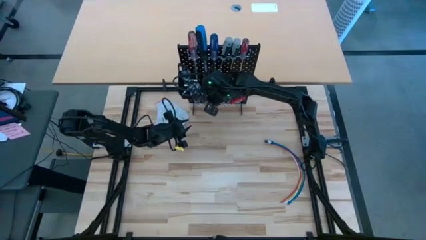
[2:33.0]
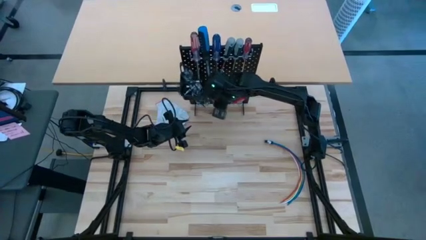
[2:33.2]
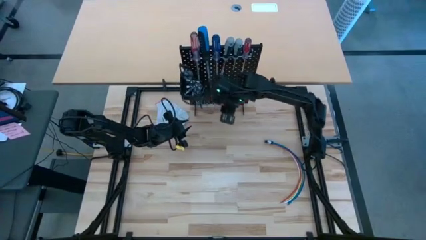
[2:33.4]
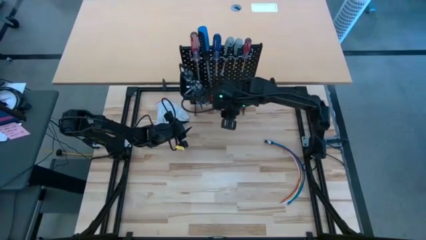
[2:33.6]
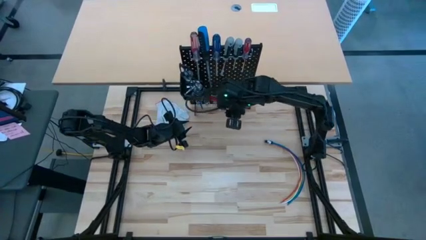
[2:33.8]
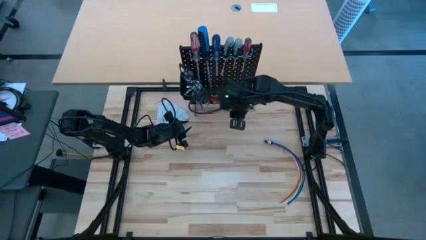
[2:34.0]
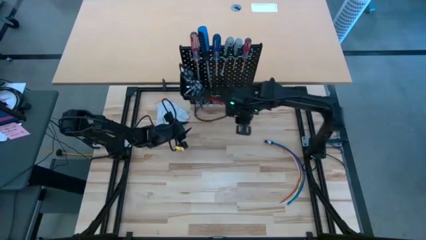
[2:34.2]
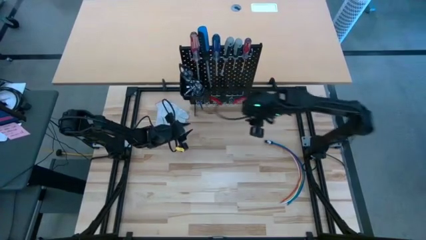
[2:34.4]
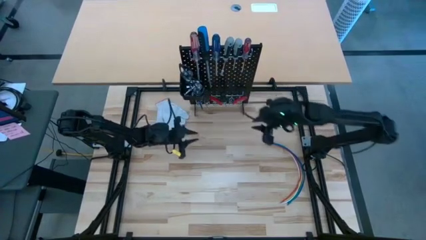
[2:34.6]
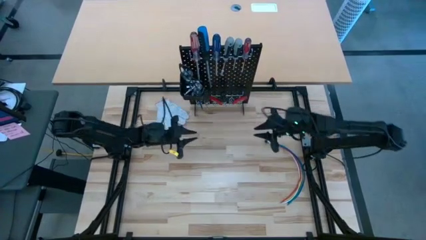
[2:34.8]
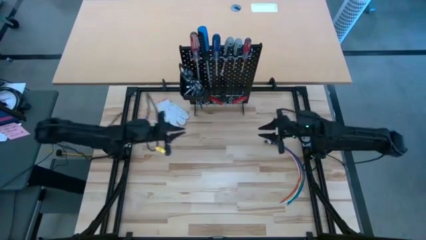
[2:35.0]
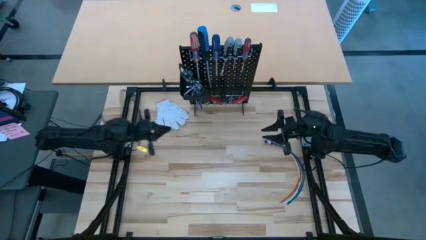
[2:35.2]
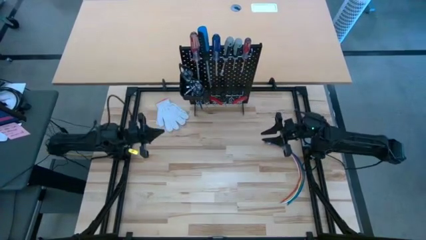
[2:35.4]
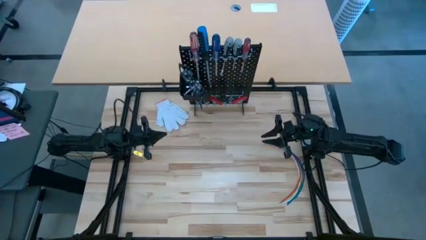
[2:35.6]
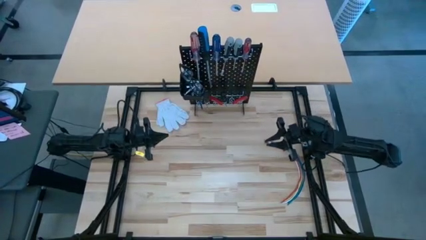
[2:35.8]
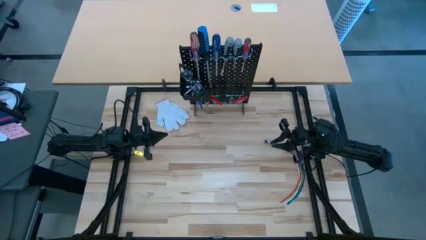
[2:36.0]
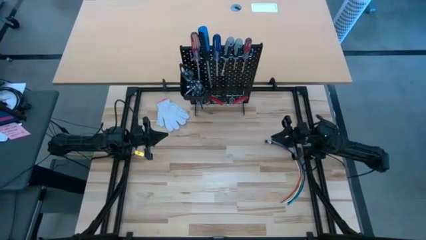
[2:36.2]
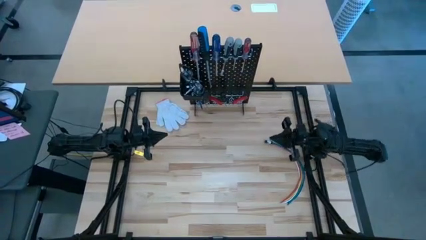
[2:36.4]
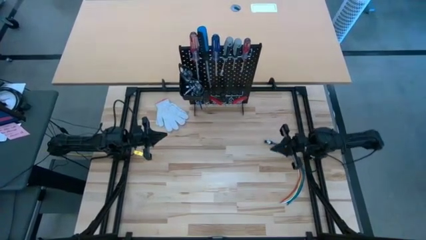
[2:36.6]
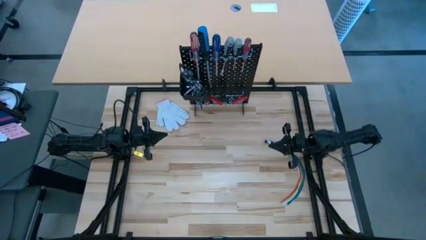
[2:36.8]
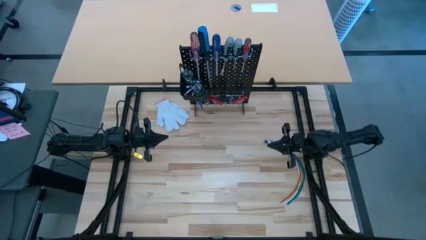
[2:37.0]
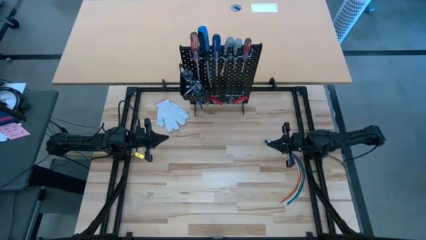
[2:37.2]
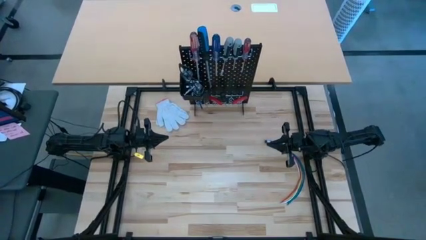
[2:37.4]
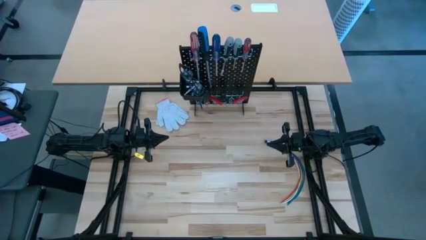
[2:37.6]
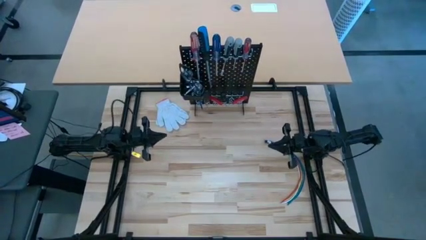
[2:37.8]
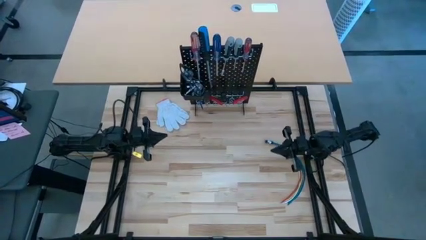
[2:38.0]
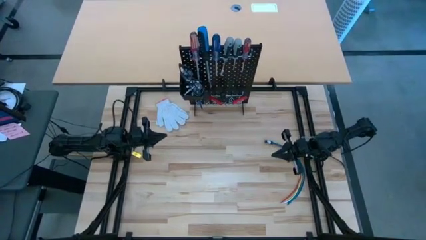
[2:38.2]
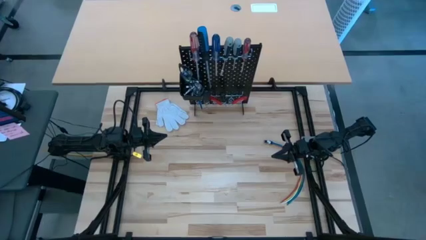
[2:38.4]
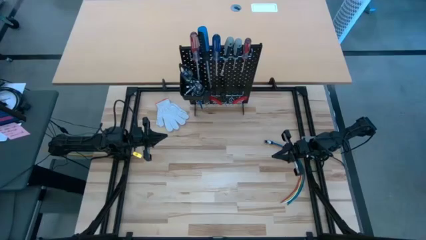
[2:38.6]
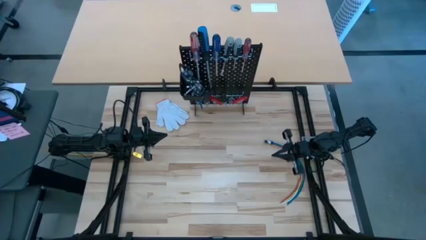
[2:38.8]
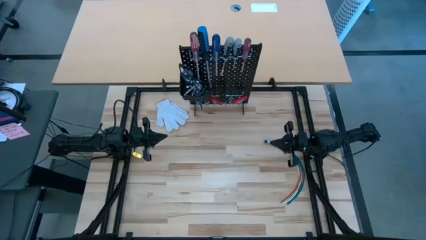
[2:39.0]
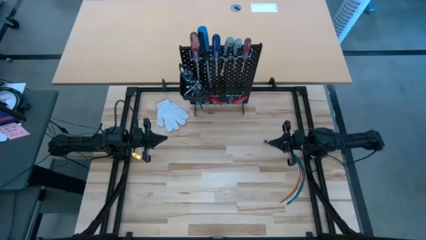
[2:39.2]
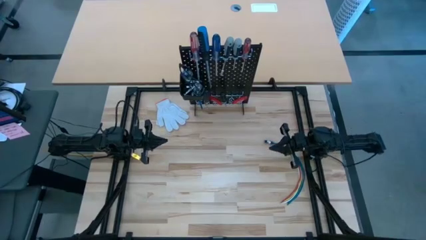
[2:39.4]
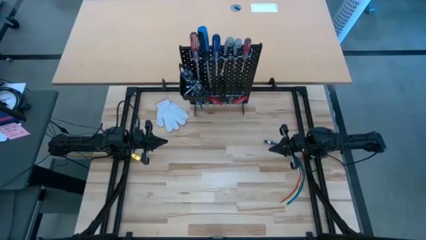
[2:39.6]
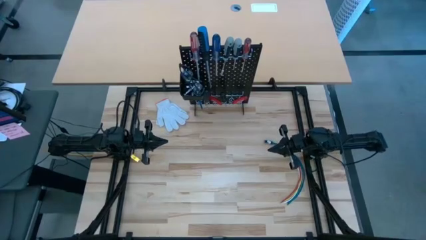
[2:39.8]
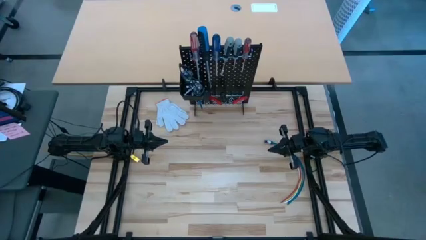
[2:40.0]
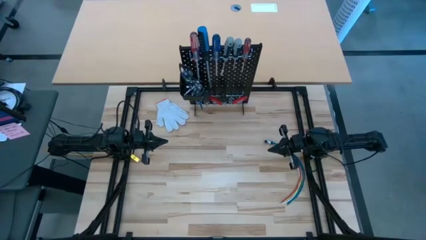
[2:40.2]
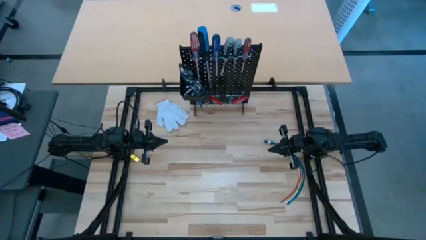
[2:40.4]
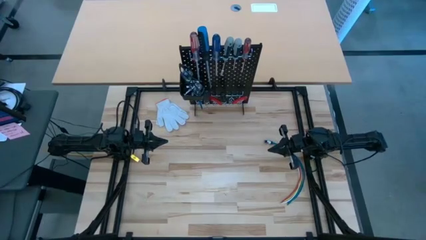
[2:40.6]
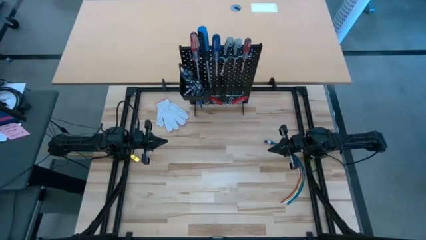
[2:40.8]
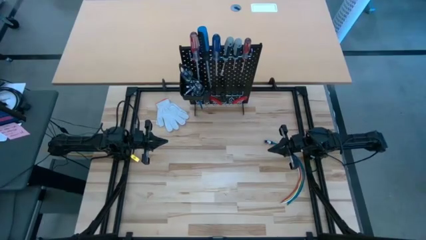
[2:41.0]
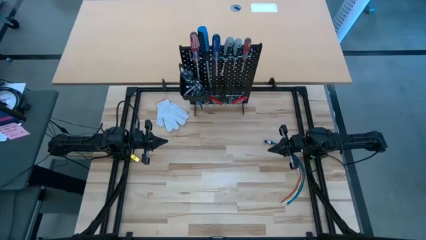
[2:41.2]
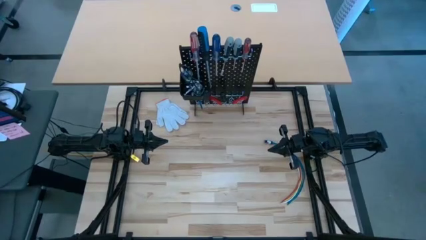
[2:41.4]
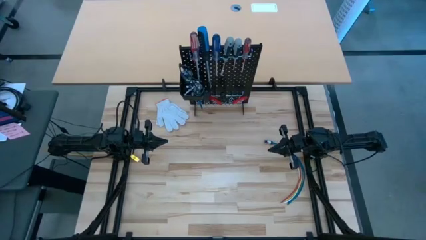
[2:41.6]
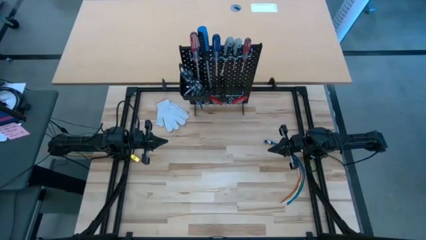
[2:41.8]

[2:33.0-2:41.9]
Task: Hang tools onto peg board
Return to Home Position

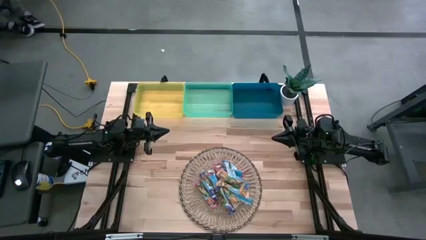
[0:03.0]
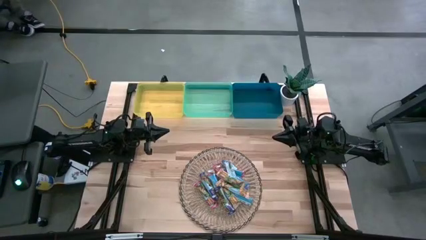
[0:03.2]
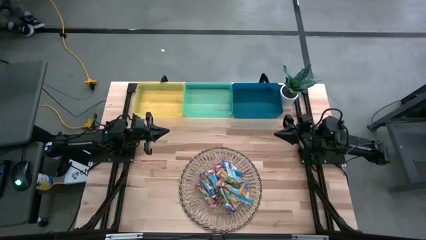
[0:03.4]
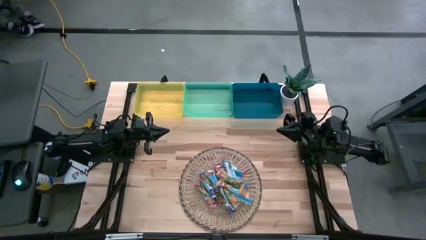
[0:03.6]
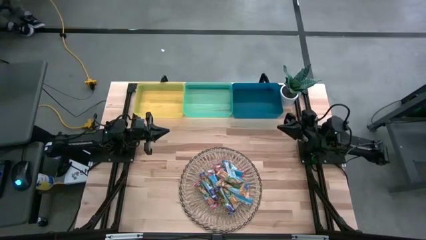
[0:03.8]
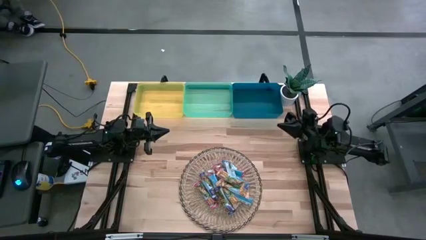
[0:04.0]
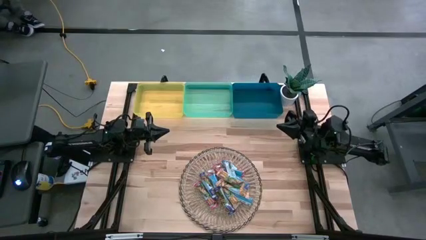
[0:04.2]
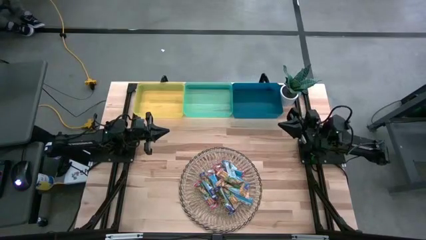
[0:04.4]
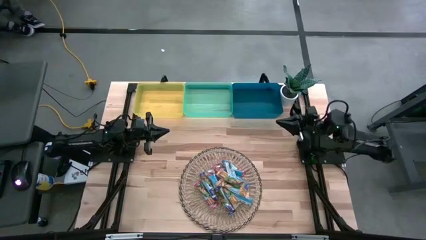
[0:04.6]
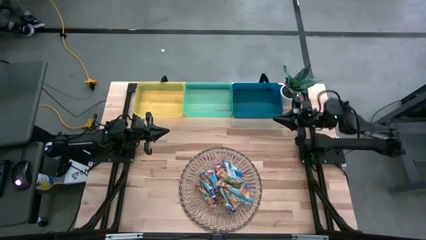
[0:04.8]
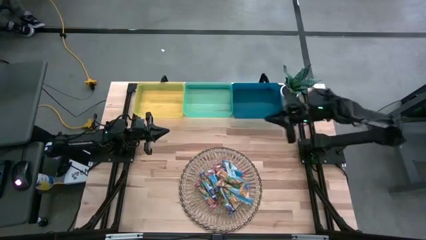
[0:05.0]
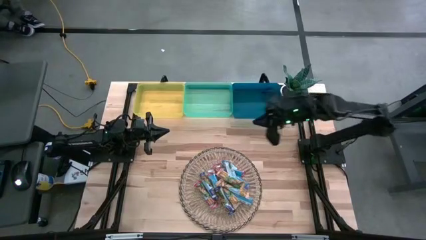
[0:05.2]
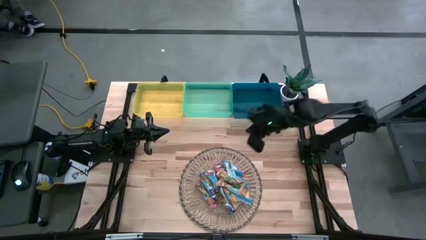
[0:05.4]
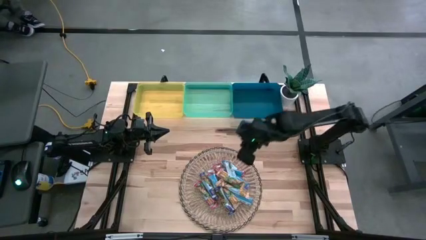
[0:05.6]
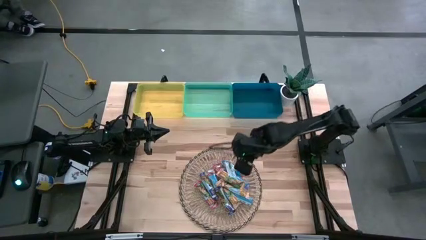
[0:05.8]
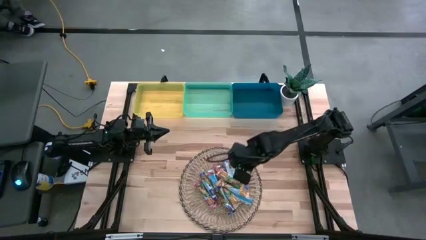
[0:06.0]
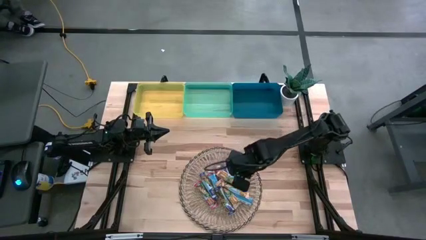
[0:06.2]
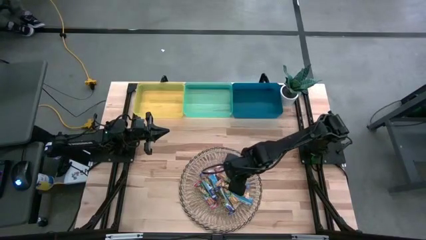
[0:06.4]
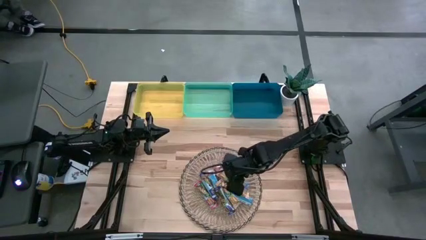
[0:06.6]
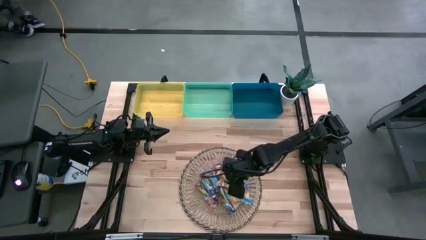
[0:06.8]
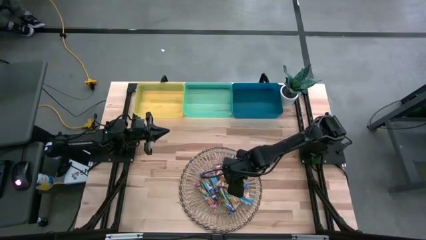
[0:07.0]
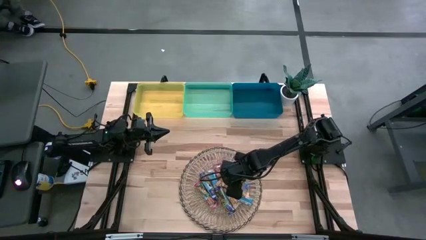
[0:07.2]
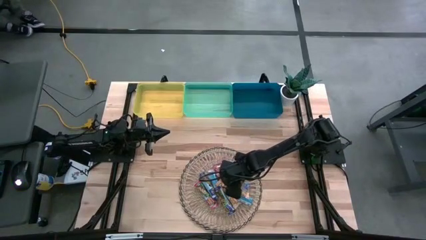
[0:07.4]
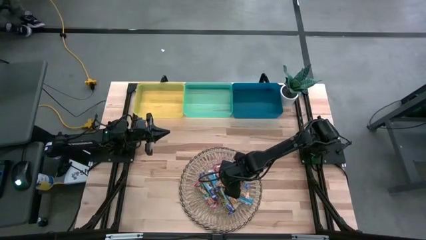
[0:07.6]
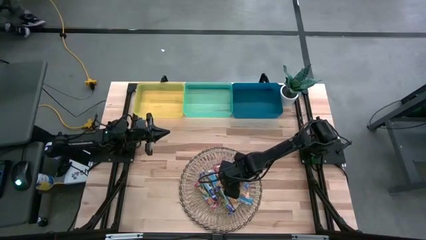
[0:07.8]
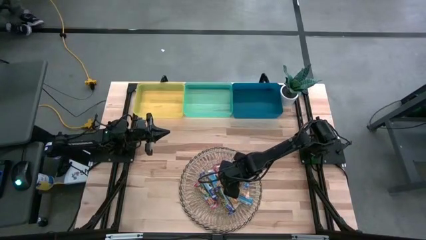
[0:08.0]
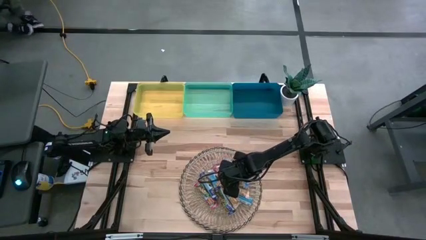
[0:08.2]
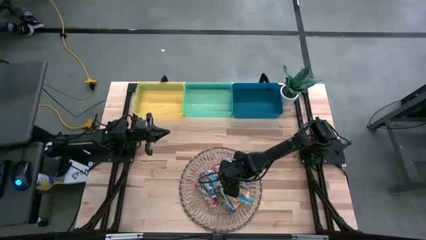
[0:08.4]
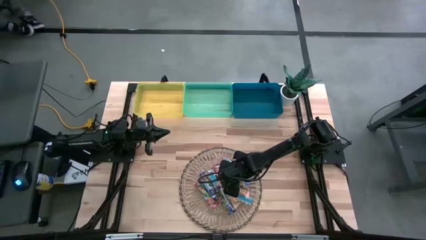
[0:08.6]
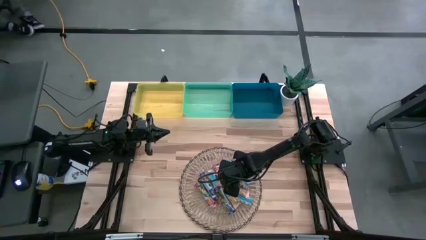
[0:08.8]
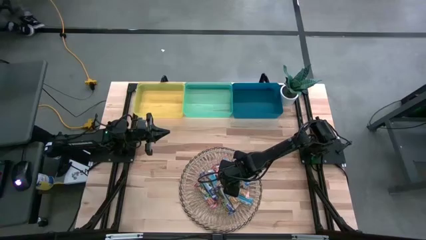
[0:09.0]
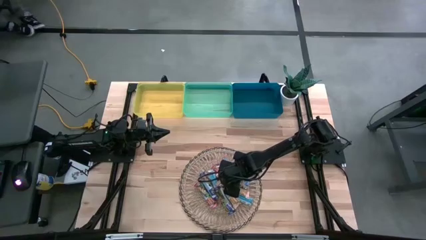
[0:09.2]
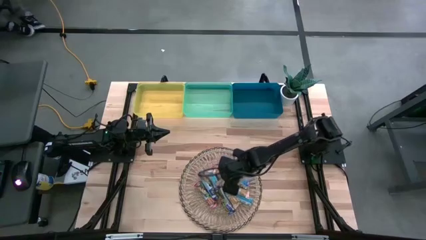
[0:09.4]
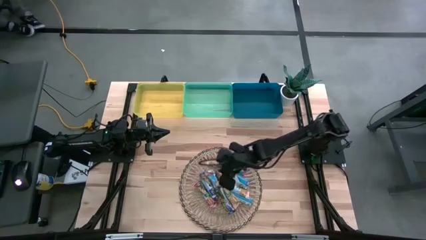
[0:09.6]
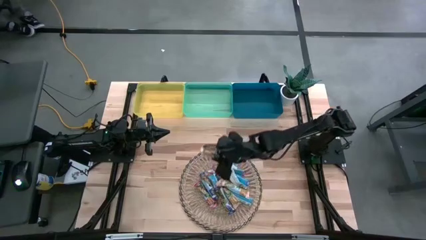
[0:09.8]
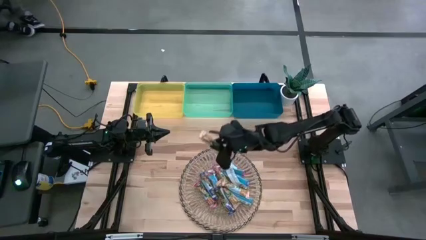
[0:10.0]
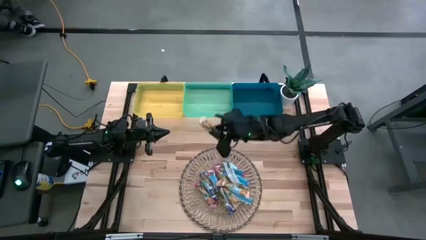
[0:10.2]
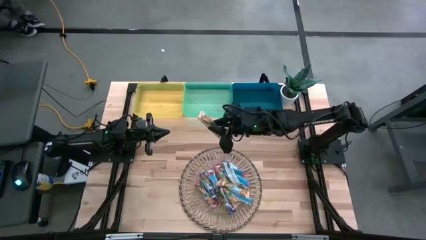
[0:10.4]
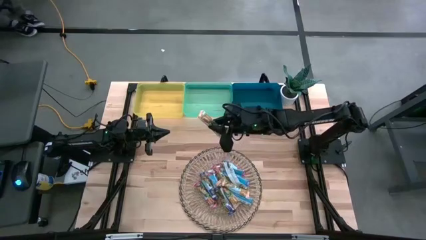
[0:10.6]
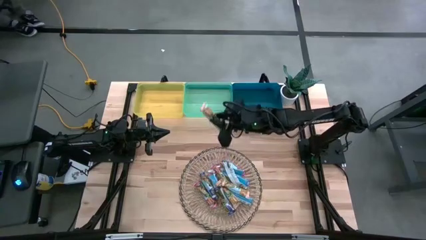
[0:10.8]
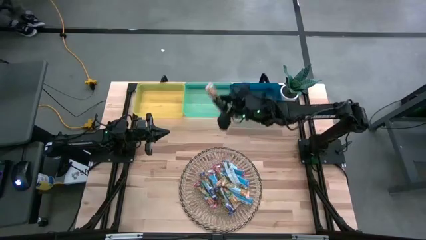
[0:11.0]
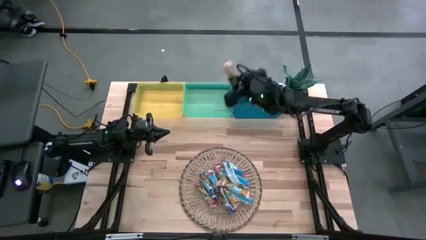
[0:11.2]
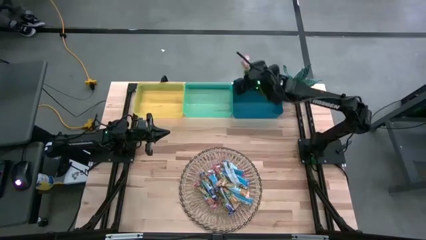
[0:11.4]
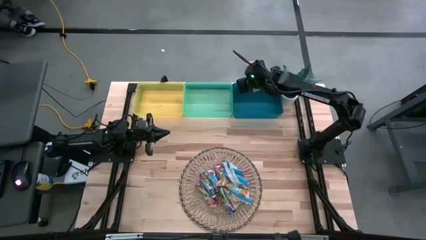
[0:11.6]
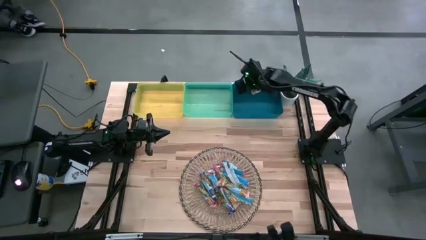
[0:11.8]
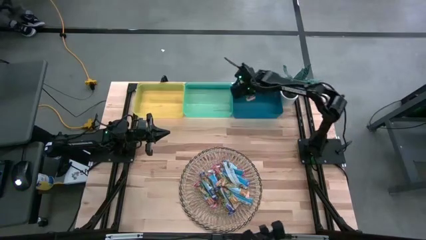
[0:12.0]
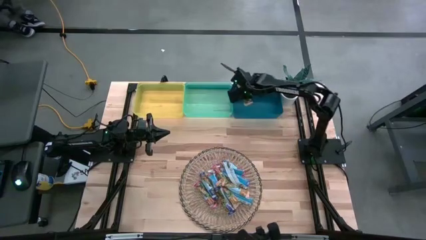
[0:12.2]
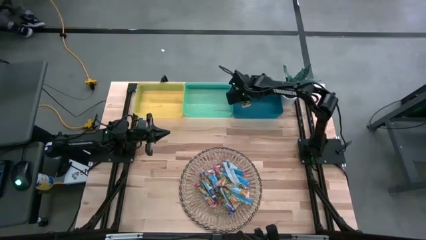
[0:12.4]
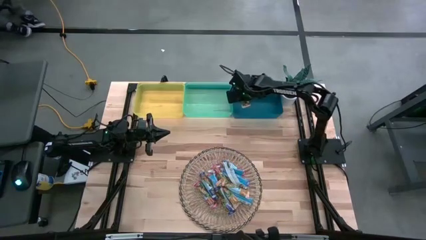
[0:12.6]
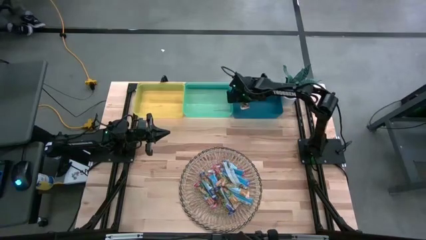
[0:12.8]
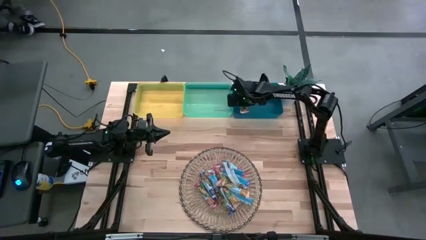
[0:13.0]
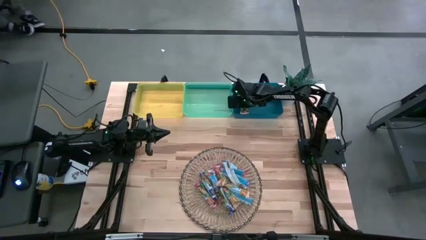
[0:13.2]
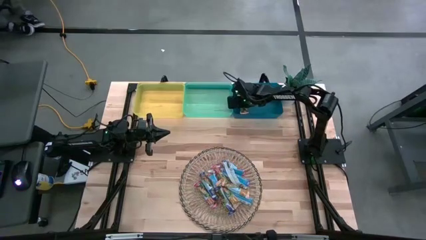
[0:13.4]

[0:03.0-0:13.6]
Task: Pick and place Granola Bars by type
Put the orange granola bar into the blue bin
